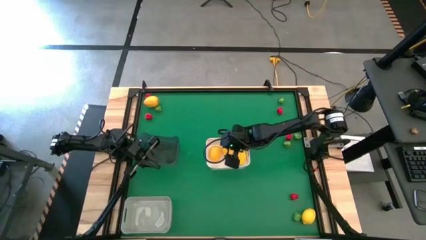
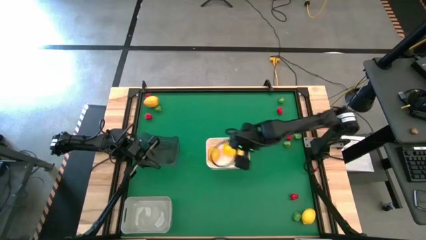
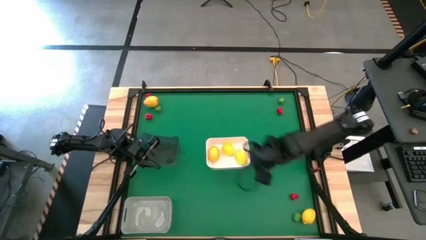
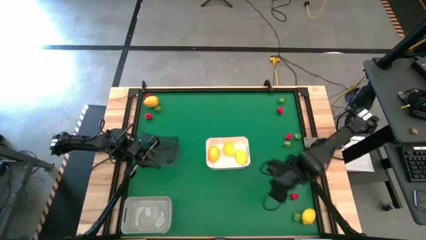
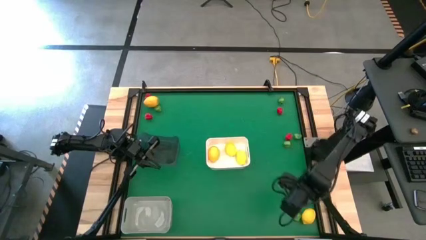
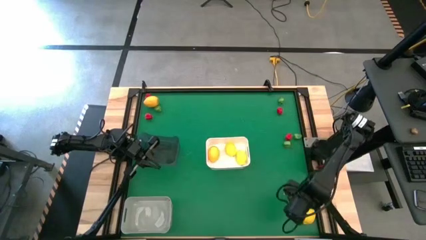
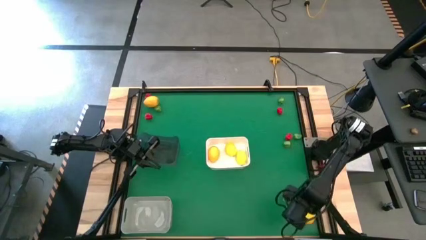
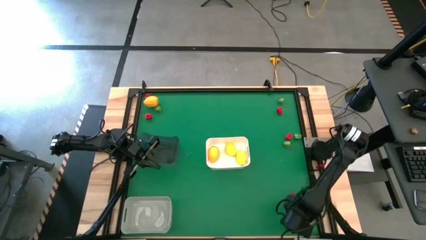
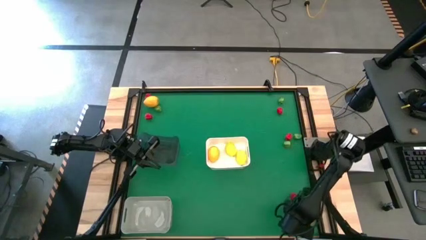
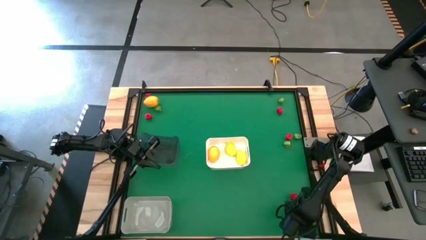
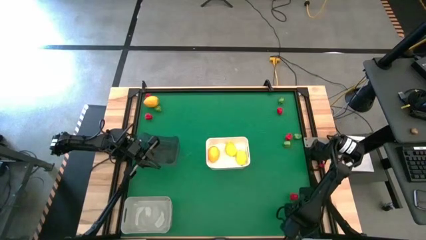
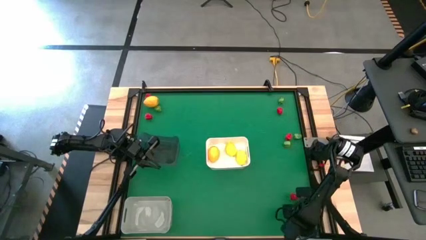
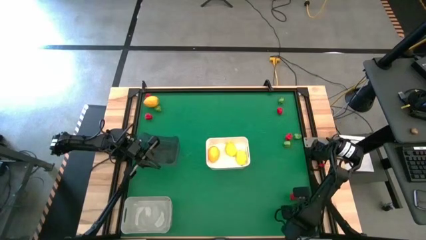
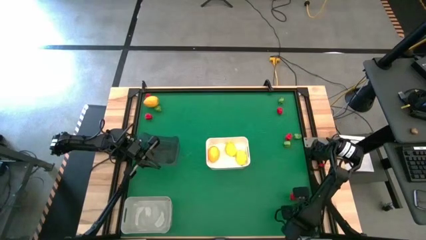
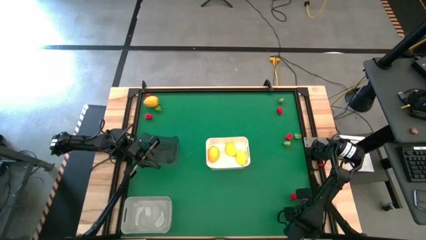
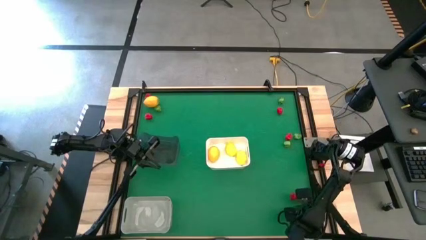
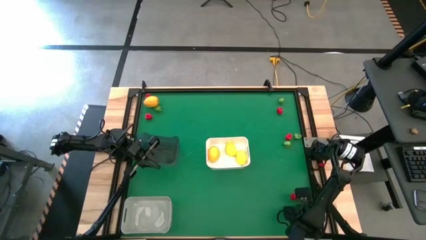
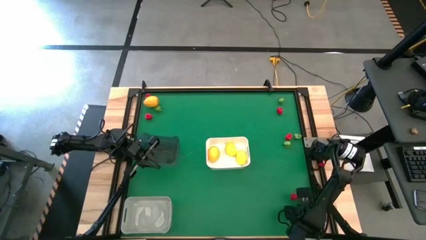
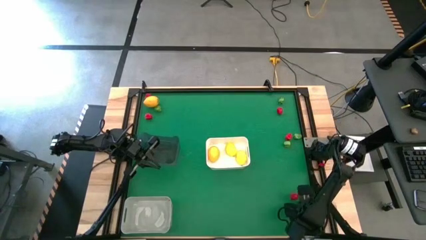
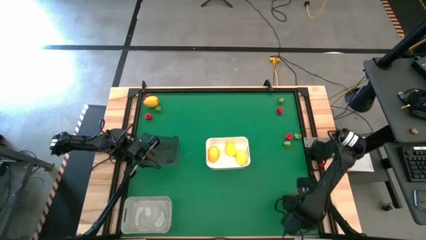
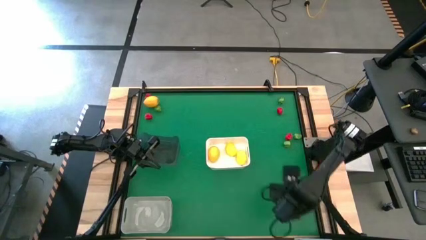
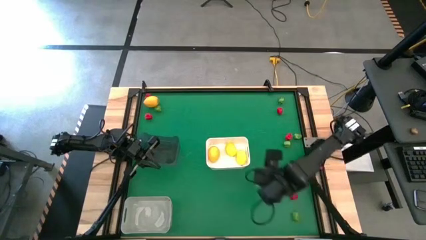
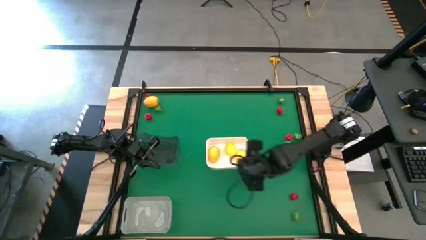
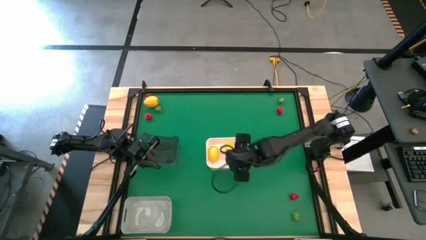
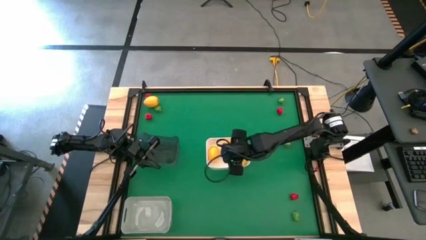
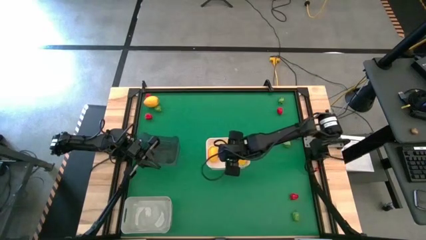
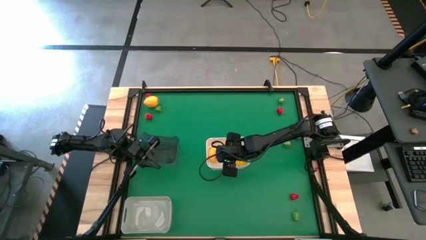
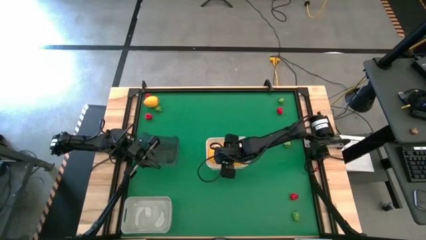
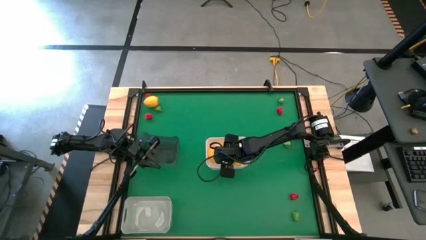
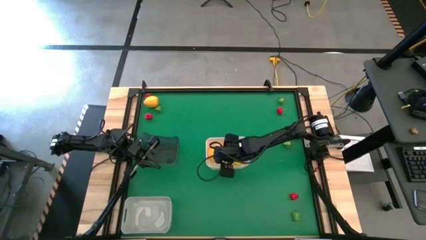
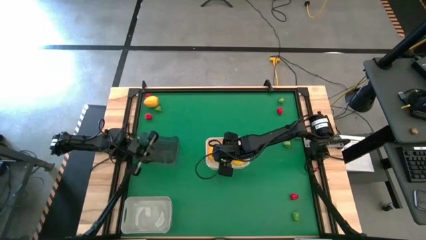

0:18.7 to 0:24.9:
Task: Sort produce into baskets
Put the yellow lemon into the white bin

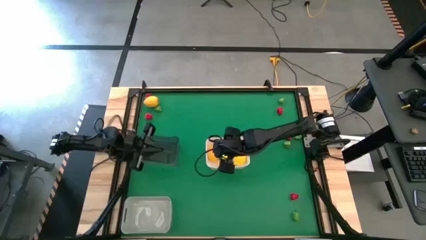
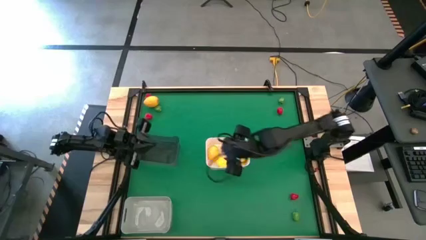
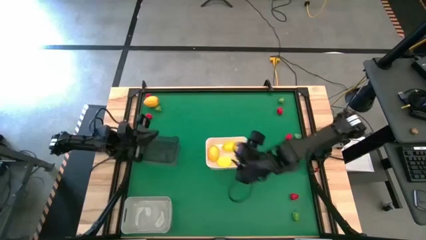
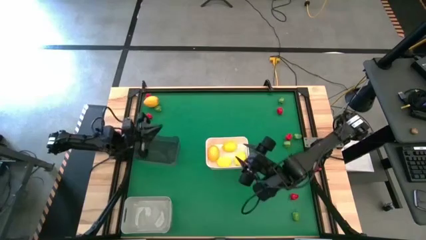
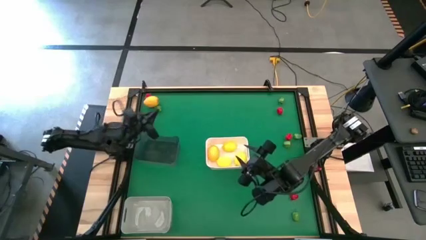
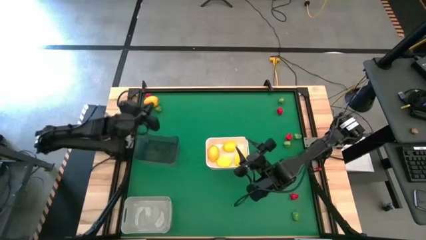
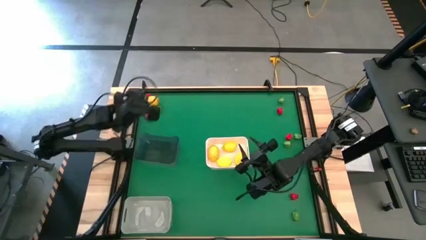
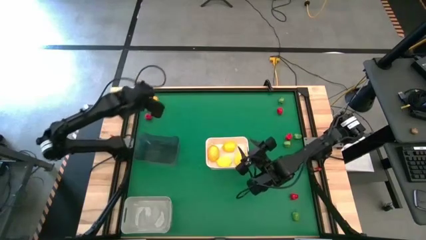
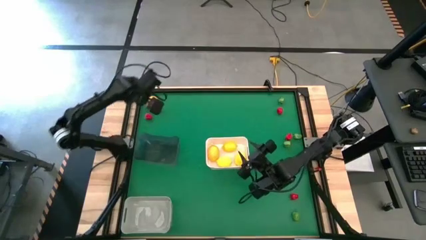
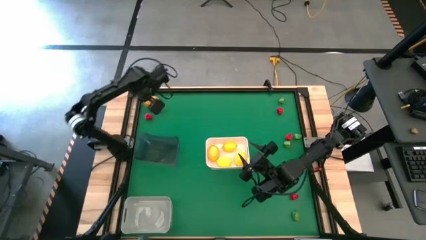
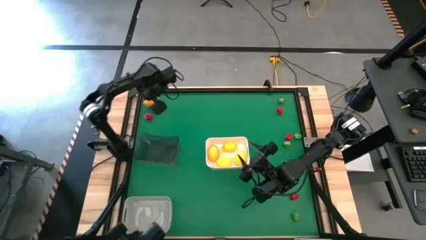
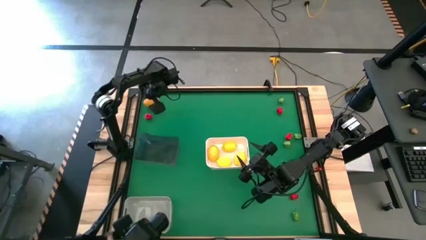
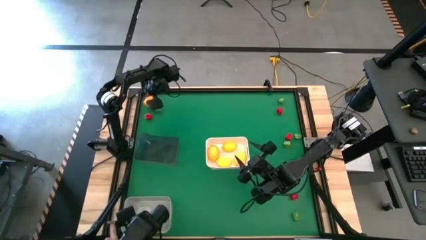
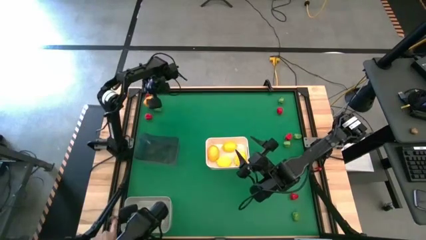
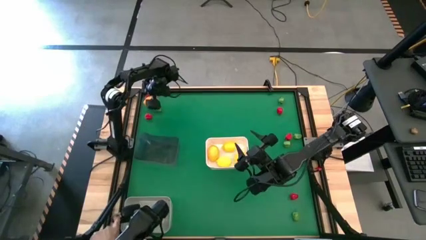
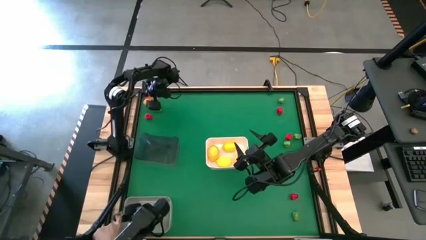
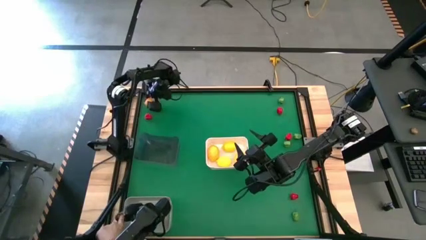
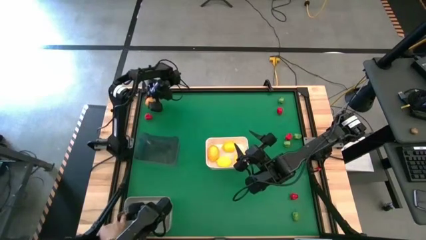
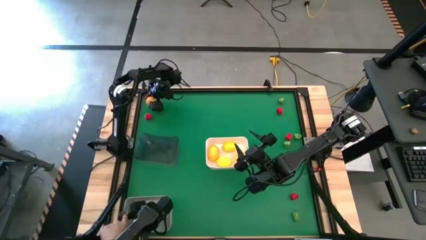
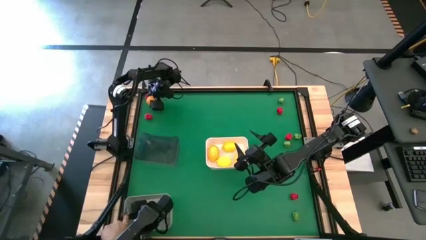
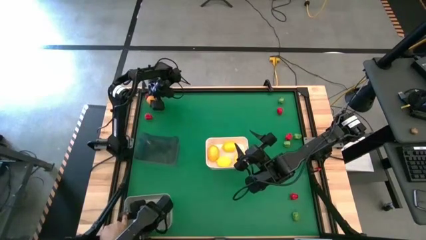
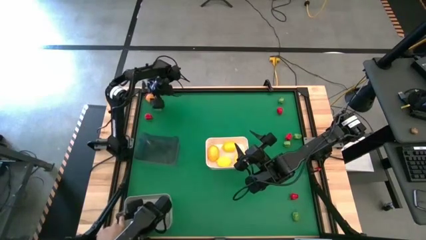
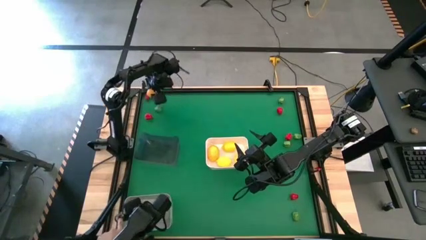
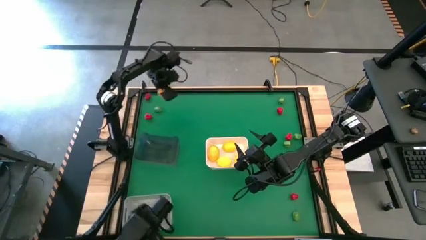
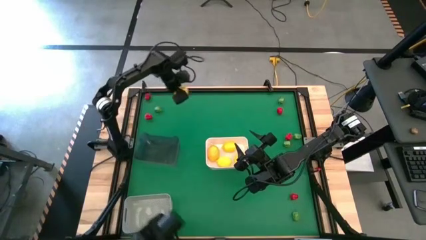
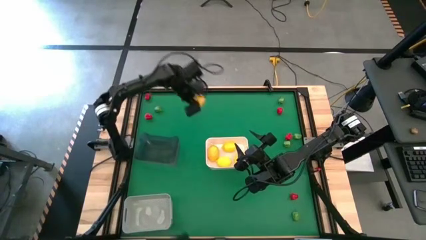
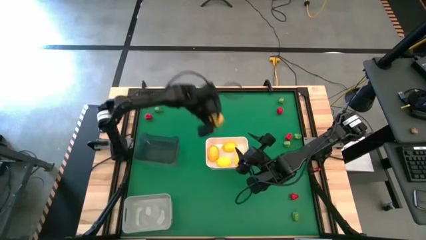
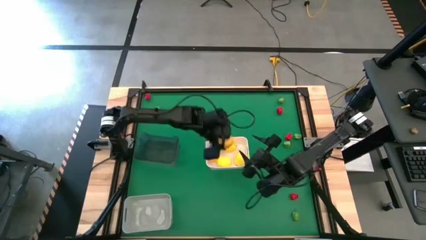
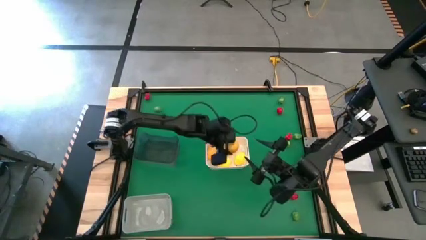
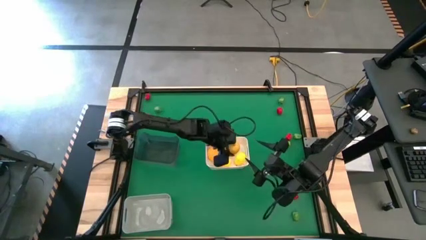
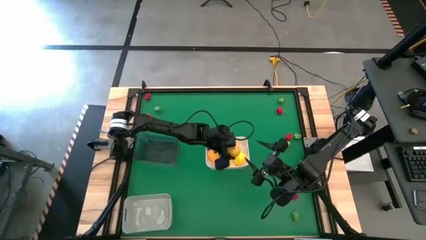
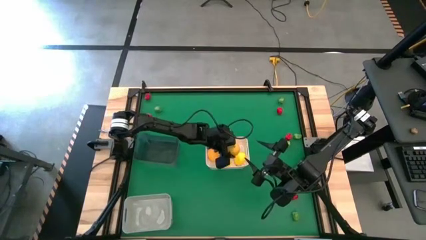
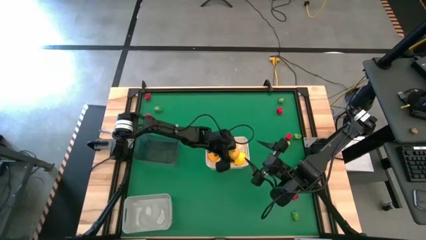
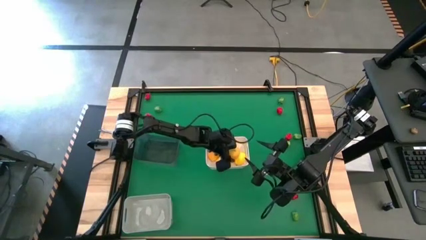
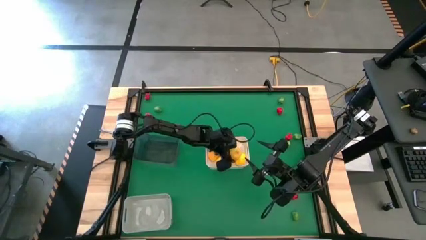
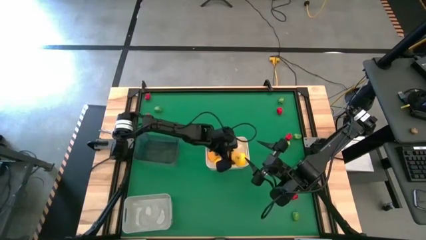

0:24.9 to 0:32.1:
Put the yellow lemon into the white bin

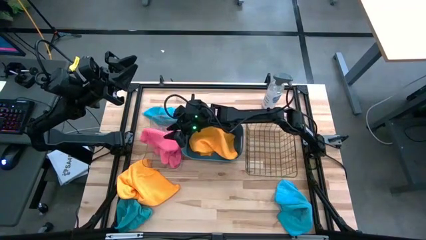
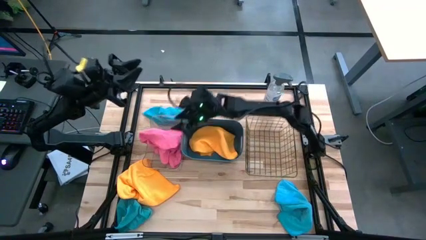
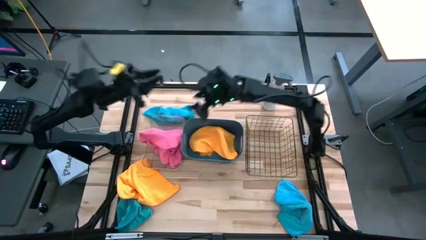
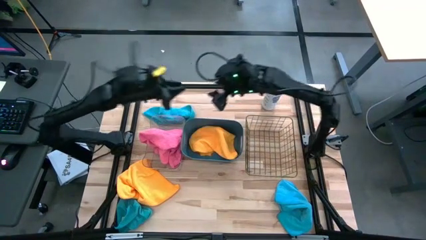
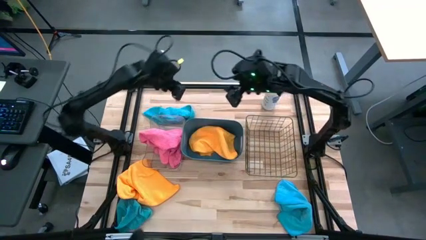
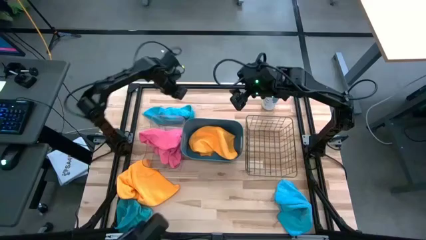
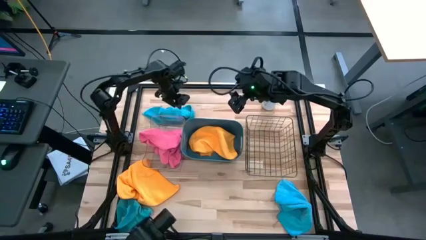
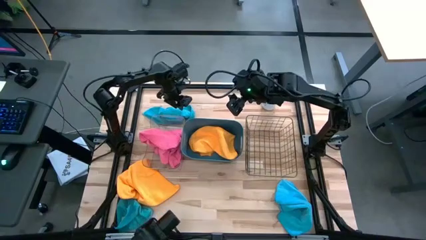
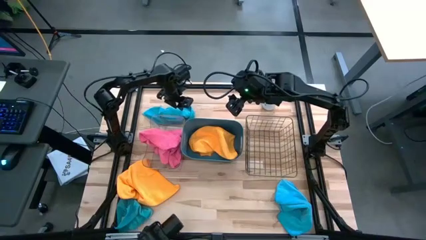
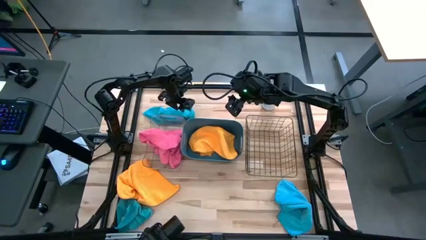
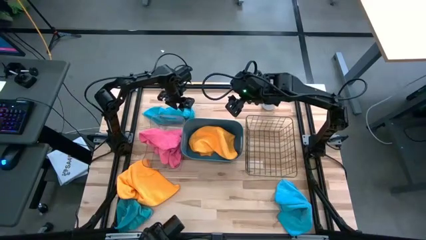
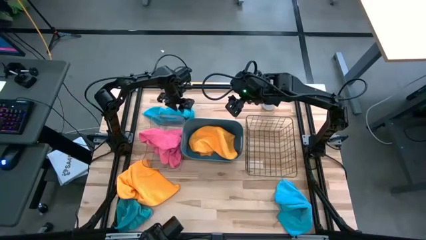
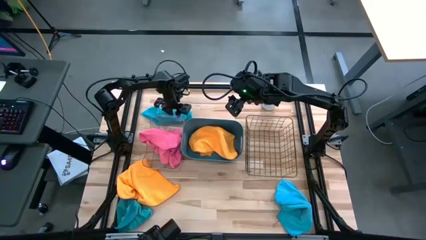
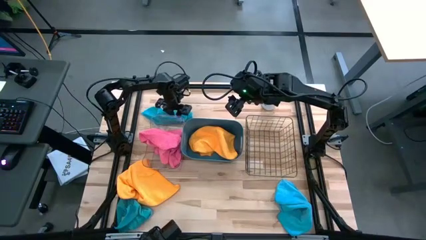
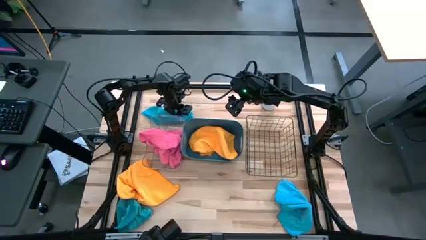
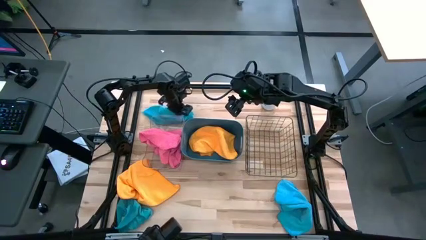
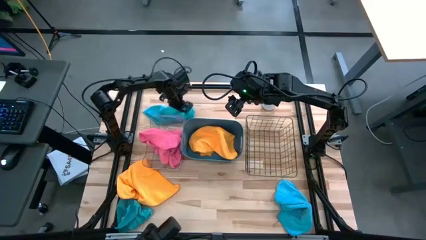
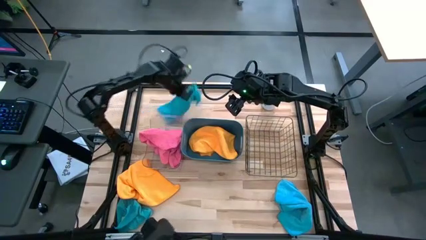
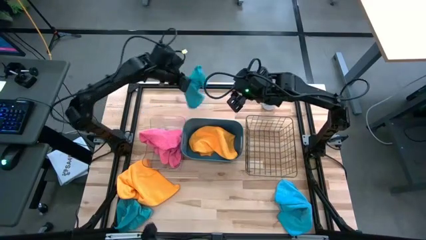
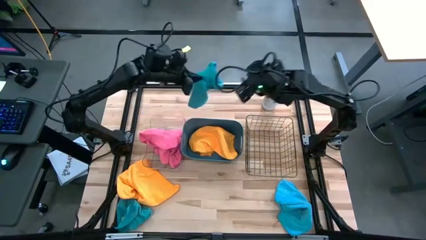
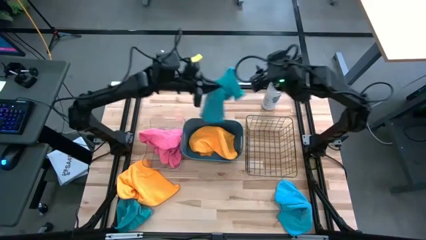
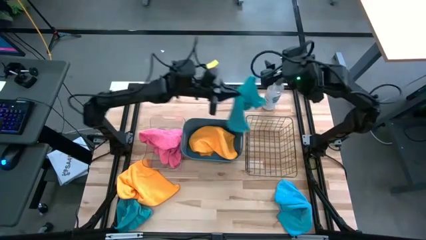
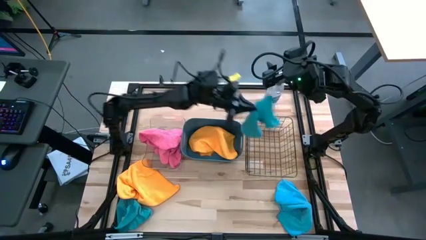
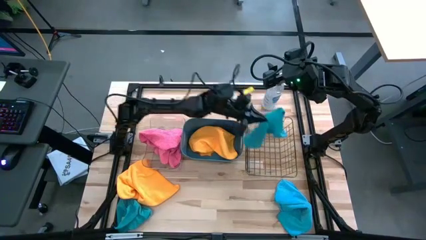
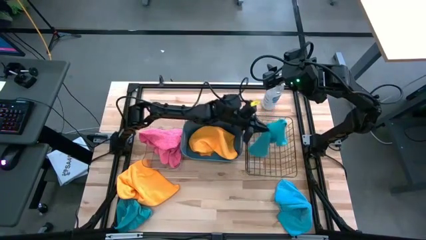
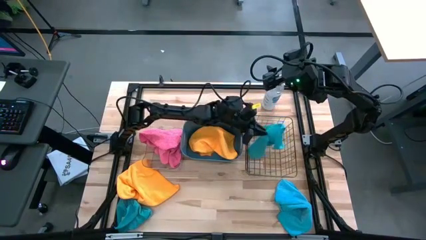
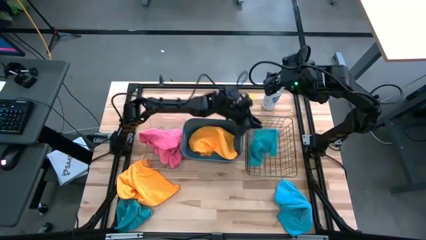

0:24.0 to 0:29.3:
Task: Sort microfiber towel by color & place in baskets
Put the top blue microfiber cloth into the wire basket
